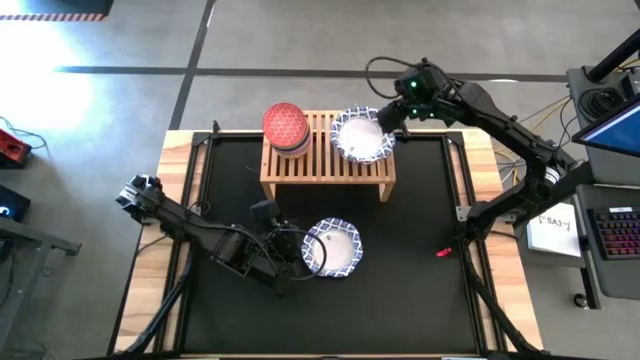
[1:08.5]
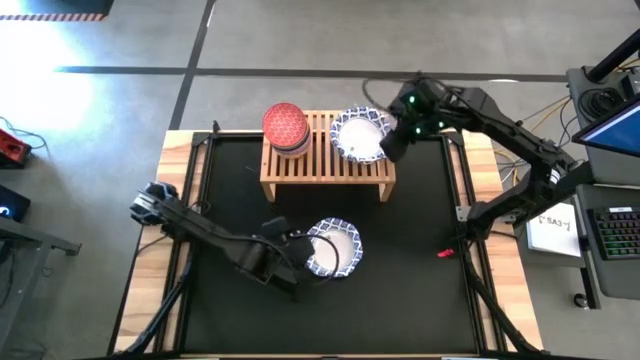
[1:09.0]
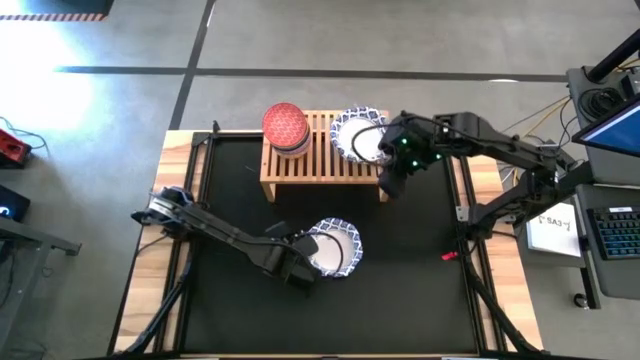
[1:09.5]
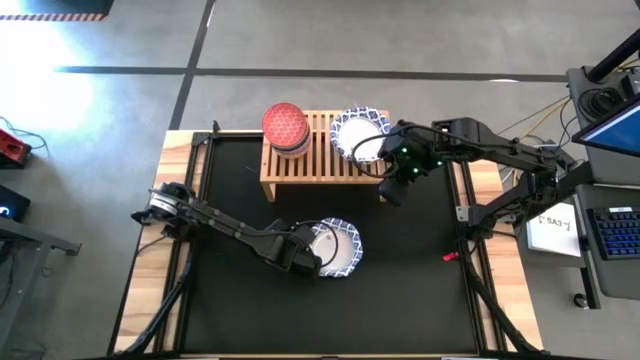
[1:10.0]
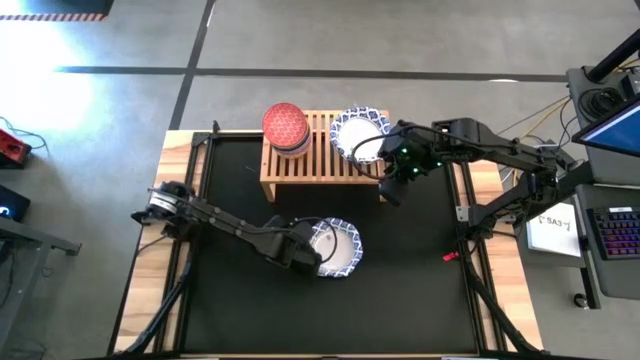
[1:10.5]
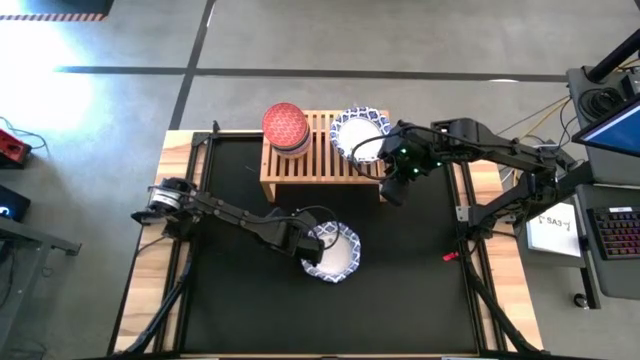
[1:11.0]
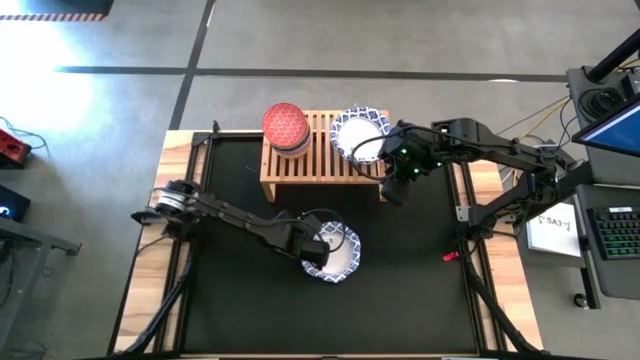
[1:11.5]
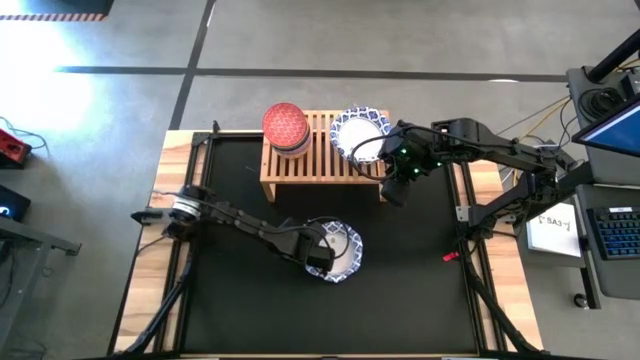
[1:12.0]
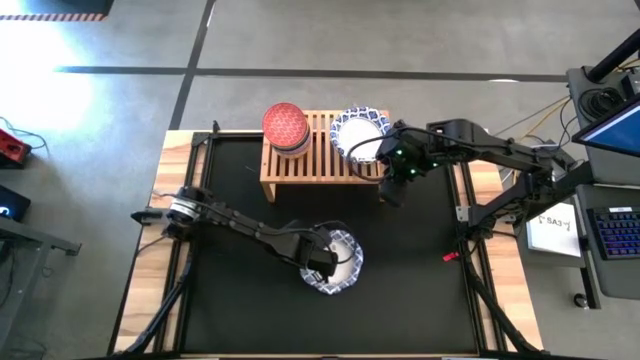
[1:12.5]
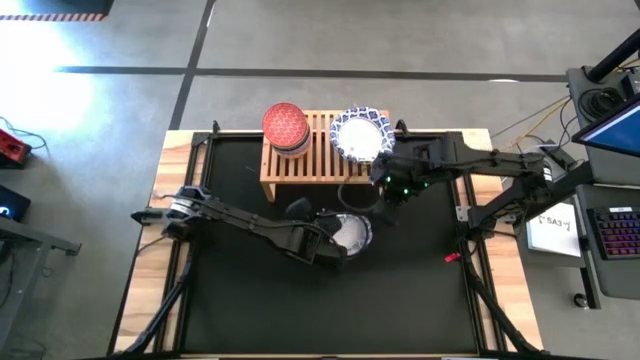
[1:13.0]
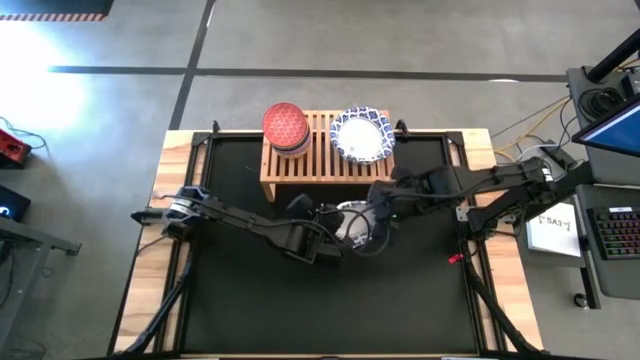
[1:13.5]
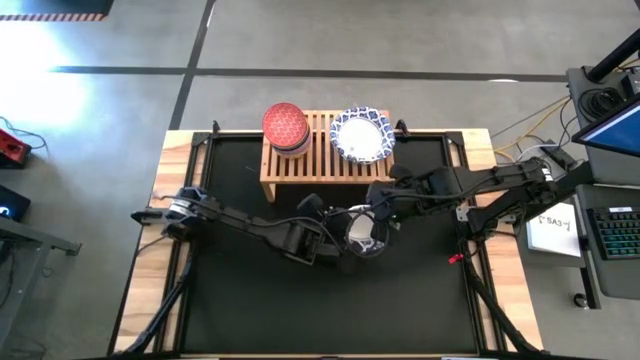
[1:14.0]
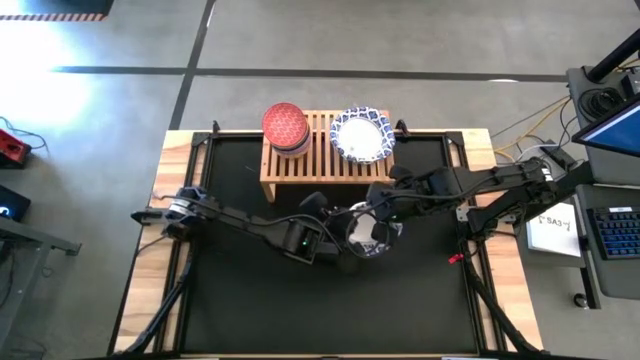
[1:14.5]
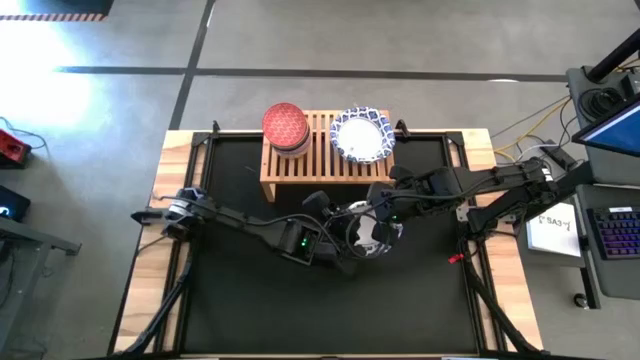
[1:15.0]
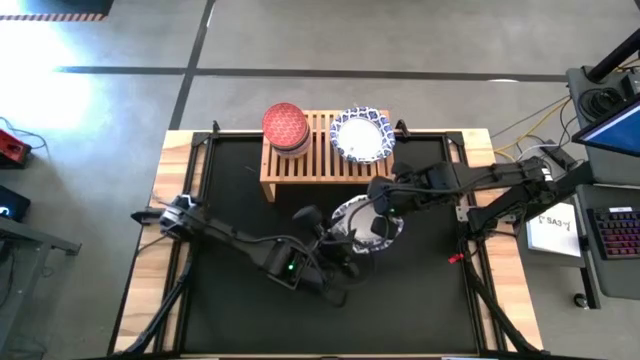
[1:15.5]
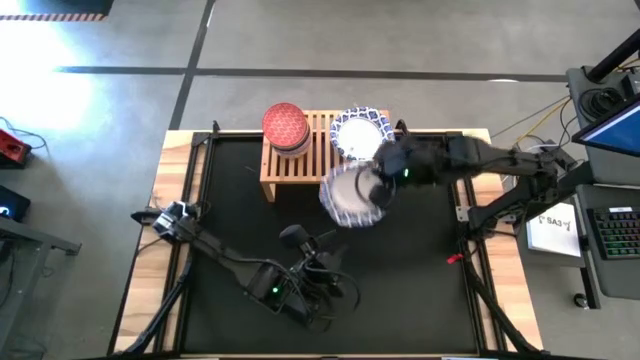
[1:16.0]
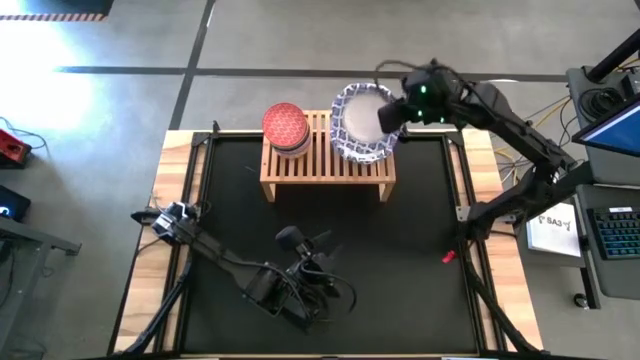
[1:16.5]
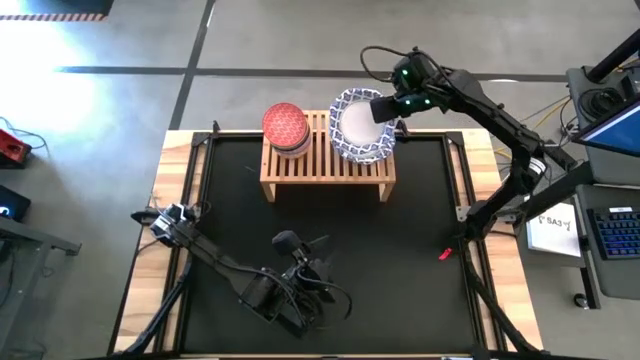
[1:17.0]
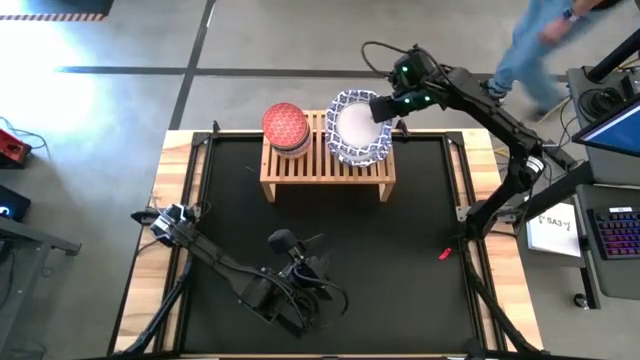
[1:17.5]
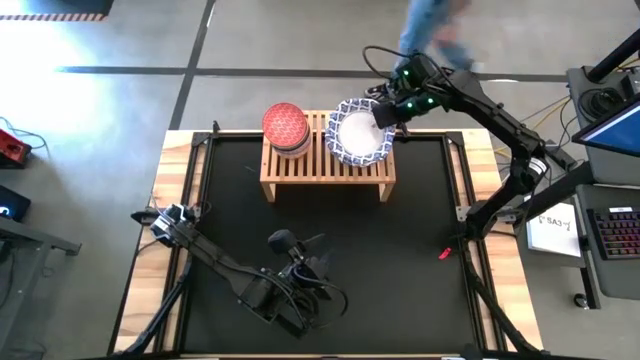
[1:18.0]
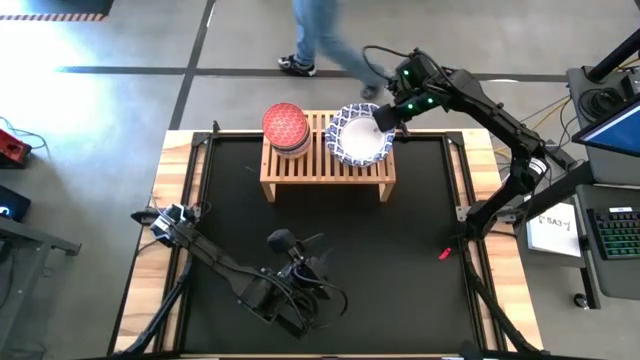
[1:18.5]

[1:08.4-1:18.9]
Task: Place and stack bowls onto a shelf
Stack the white bowl on top of the white bowl on the shelf

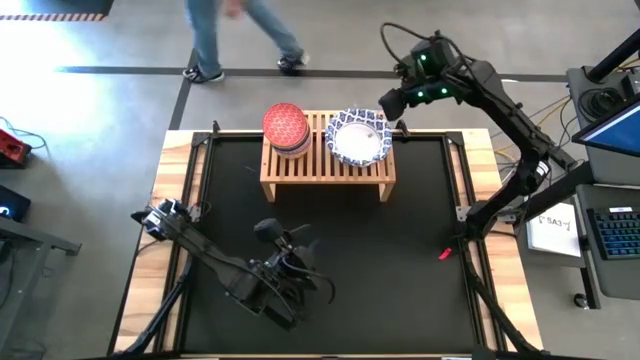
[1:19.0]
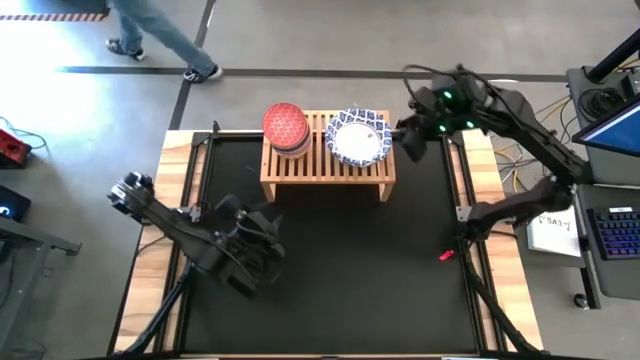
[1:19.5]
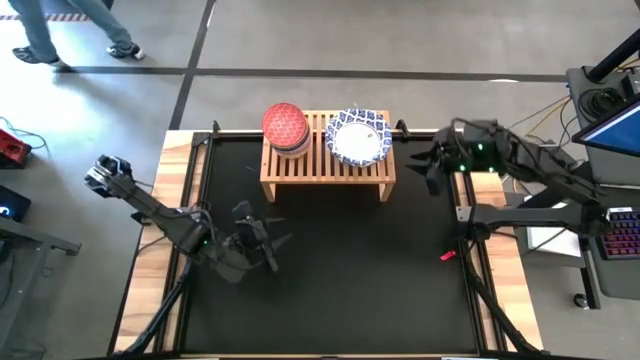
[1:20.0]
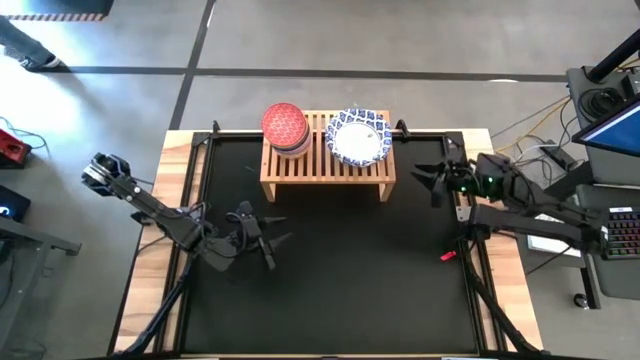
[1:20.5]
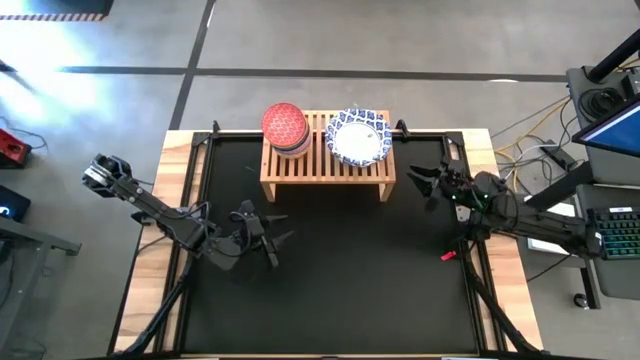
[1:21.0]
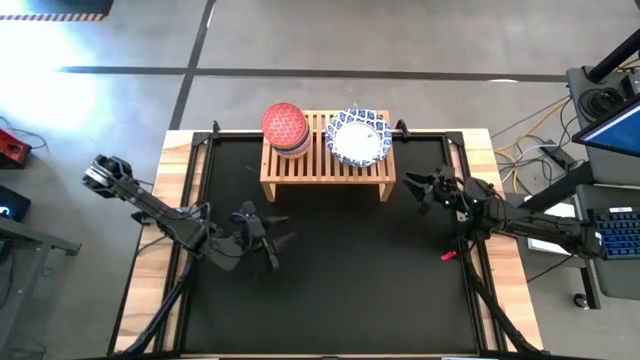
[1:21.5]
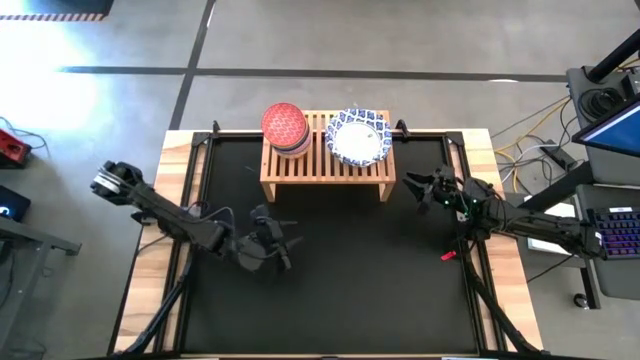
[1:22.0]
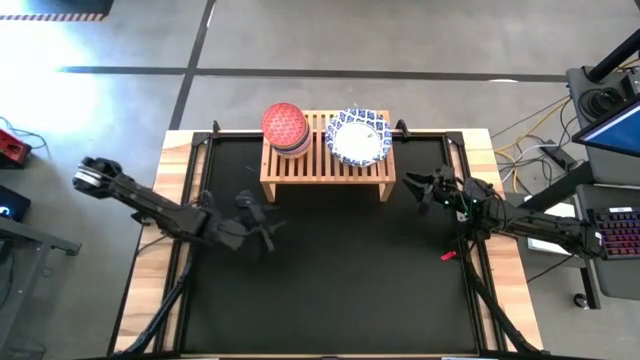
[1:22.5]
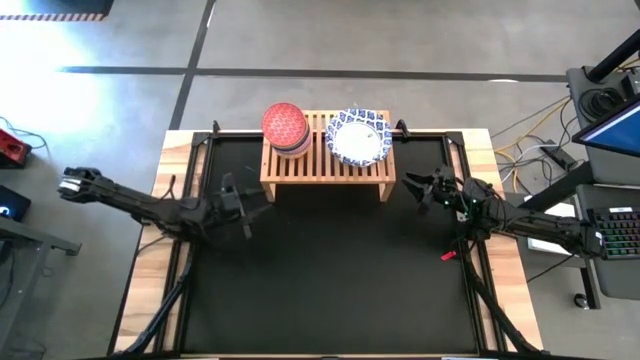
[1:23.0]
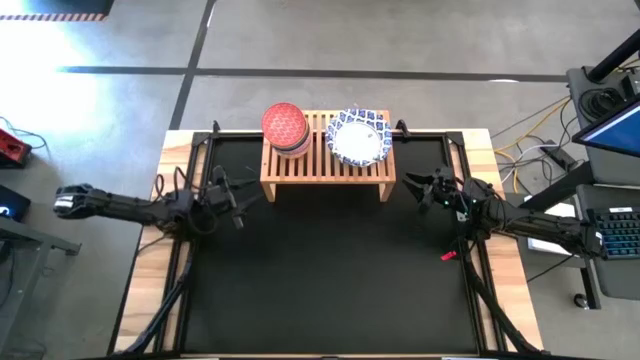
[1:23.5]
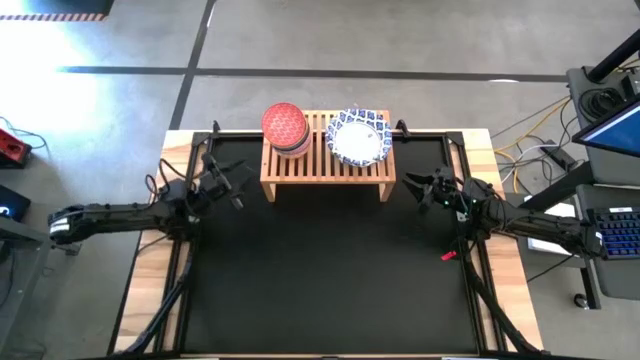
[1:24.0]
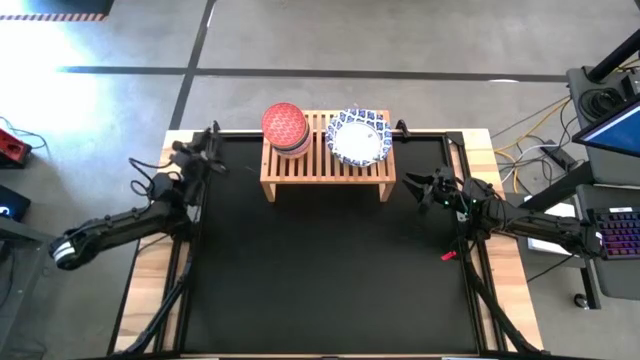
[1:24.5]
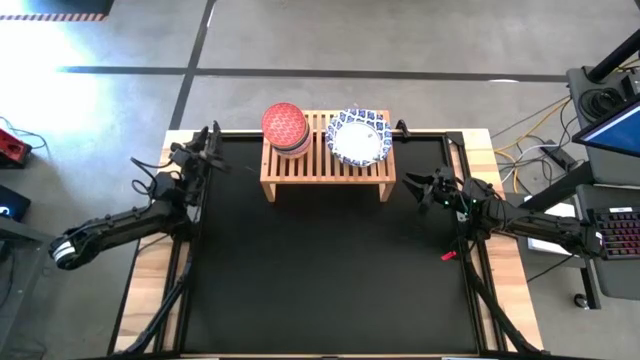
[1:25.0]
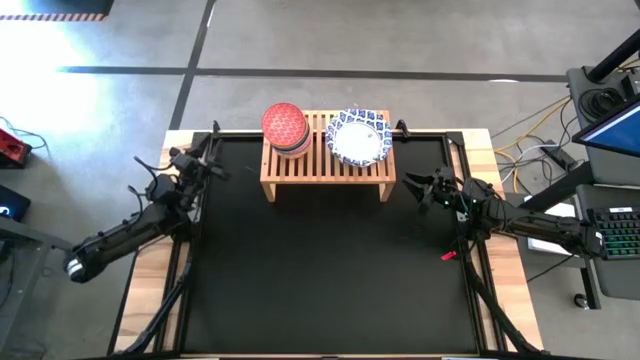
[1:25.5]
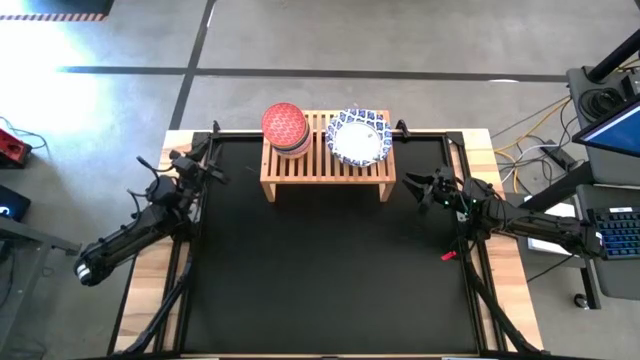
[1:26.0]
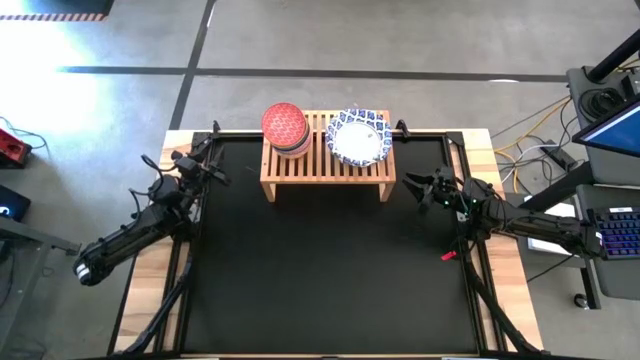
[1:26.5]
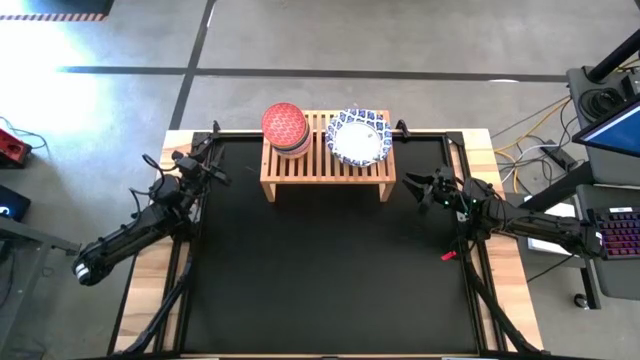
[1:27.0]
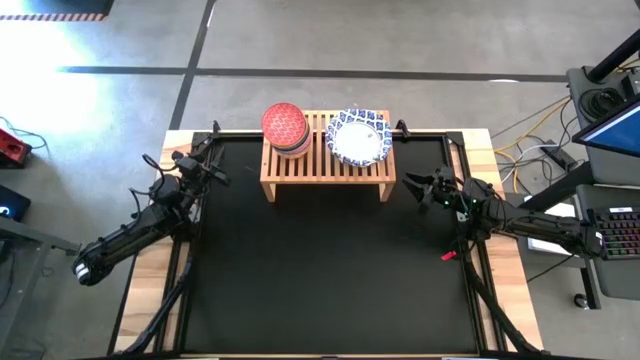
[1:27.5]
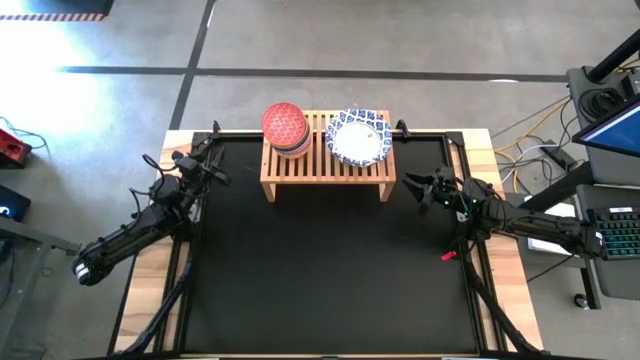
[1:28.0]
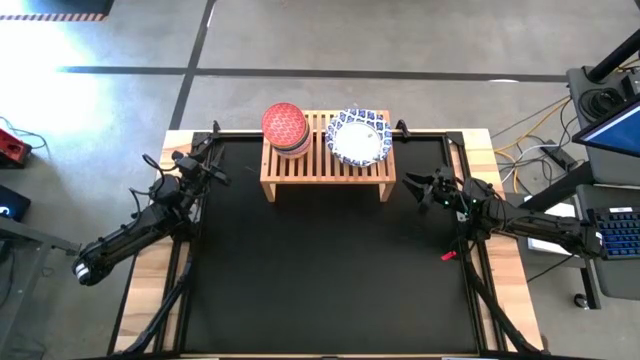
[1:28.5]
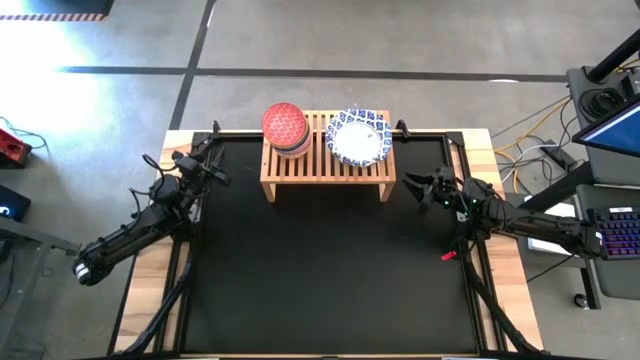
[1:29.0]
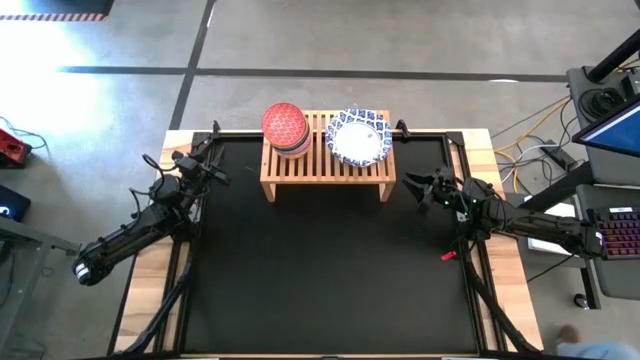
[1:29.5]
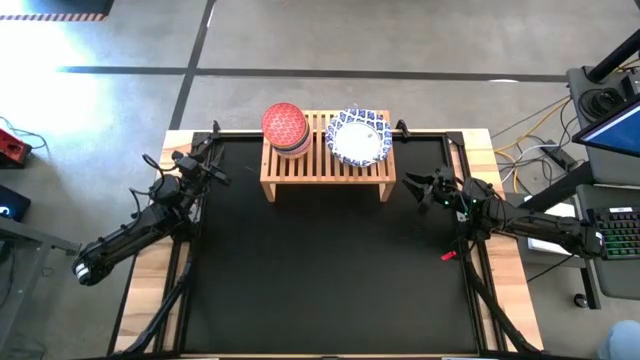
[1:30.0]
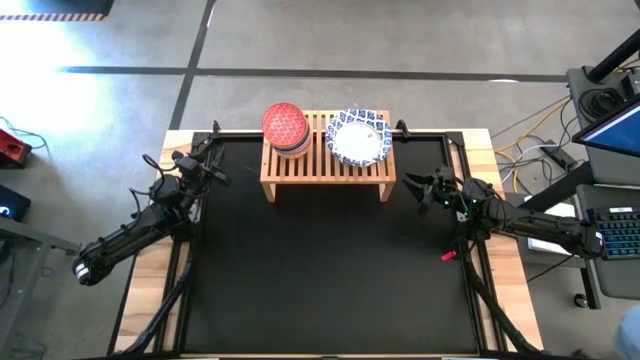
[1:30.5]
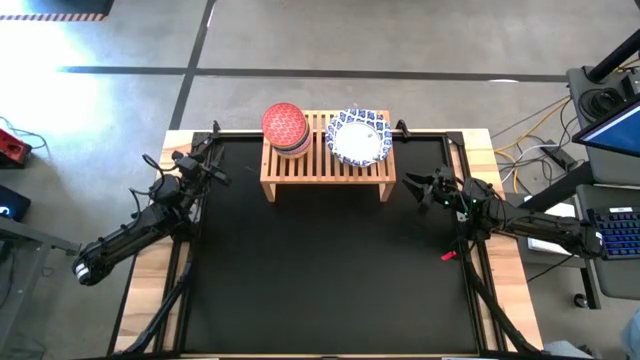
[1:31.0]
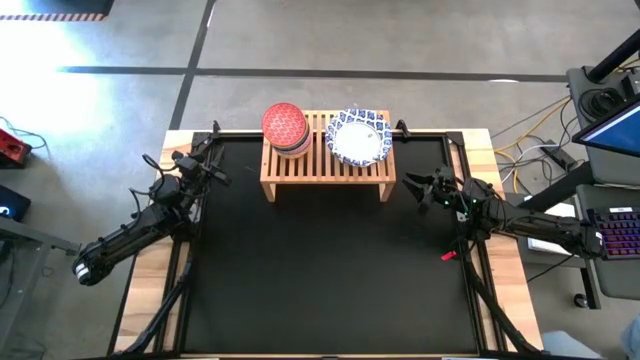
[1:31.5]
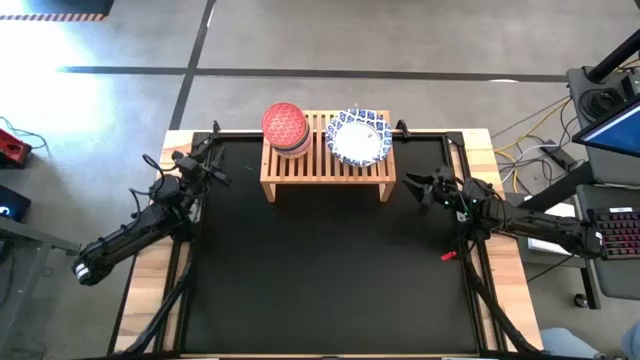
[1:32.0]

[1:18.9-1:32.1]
Return to Home Position
